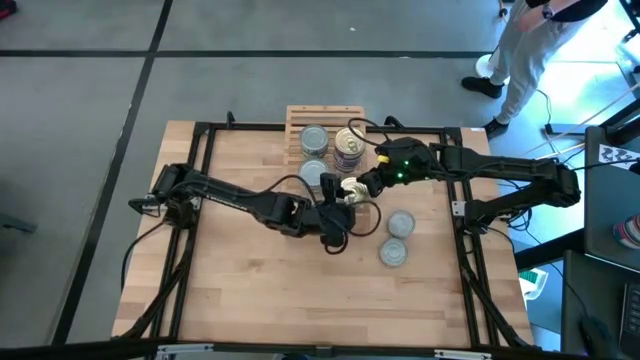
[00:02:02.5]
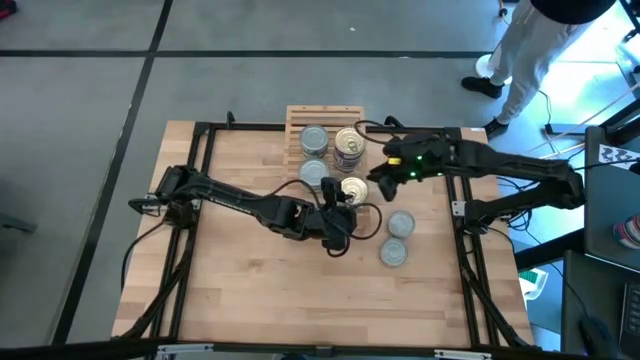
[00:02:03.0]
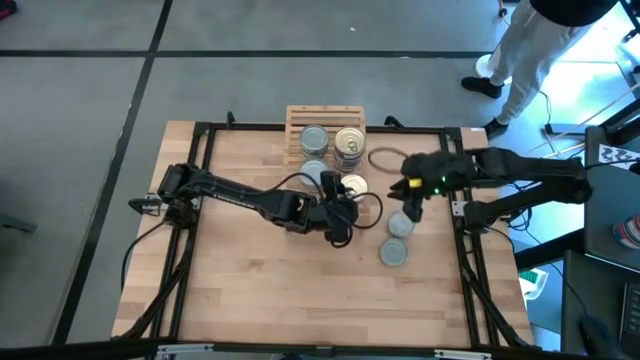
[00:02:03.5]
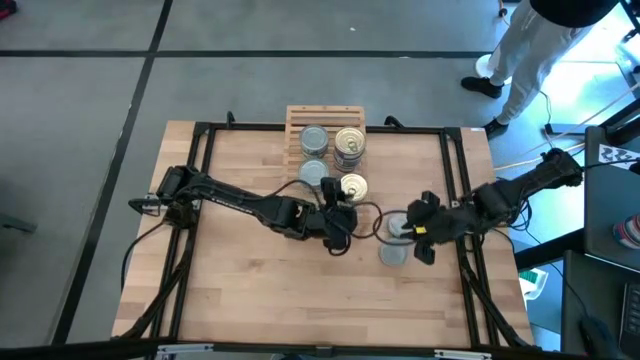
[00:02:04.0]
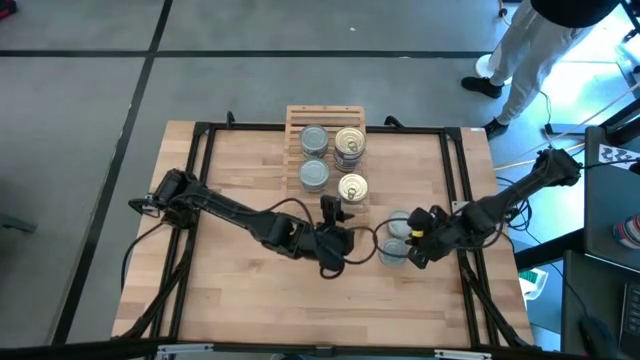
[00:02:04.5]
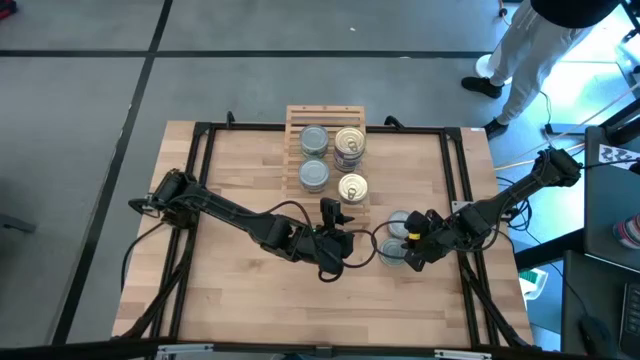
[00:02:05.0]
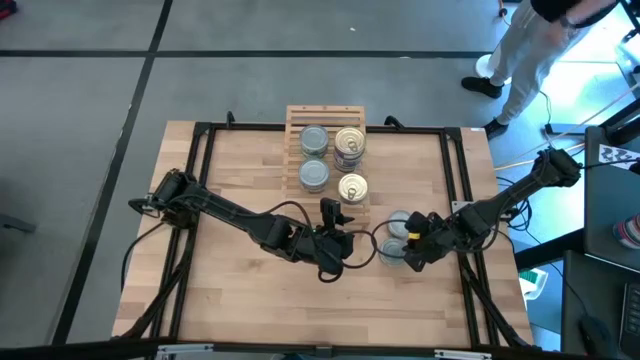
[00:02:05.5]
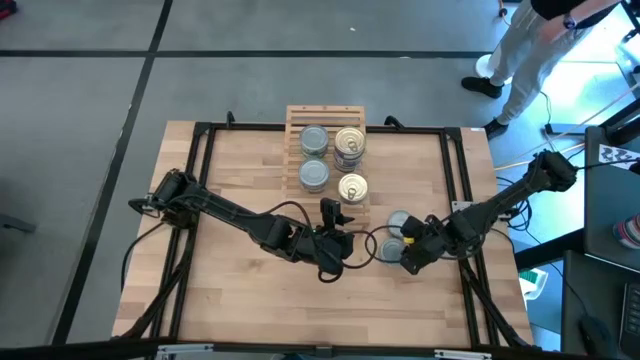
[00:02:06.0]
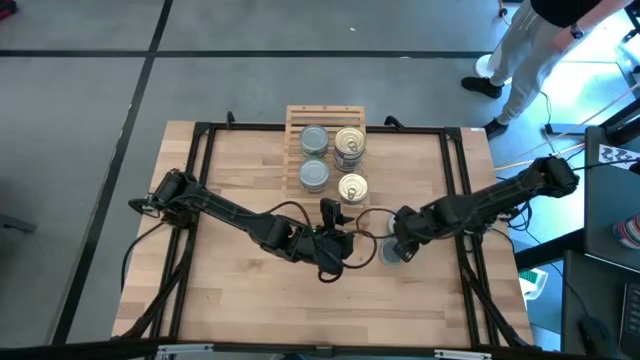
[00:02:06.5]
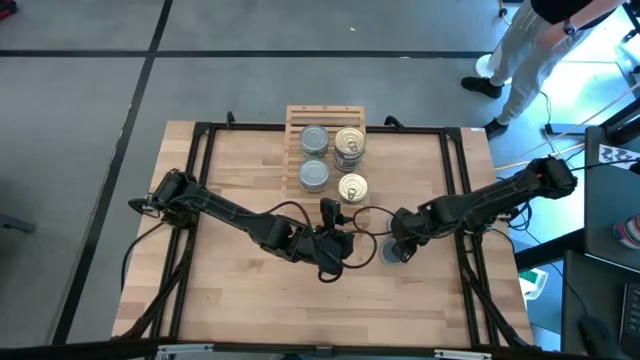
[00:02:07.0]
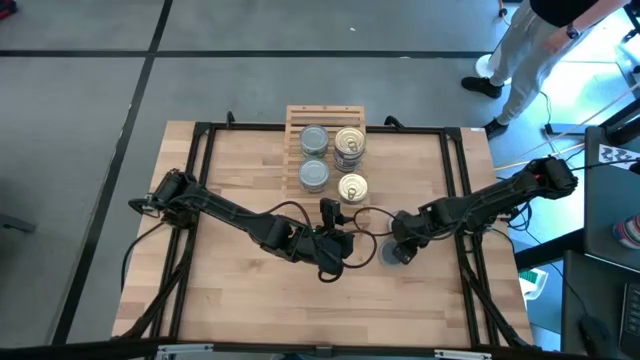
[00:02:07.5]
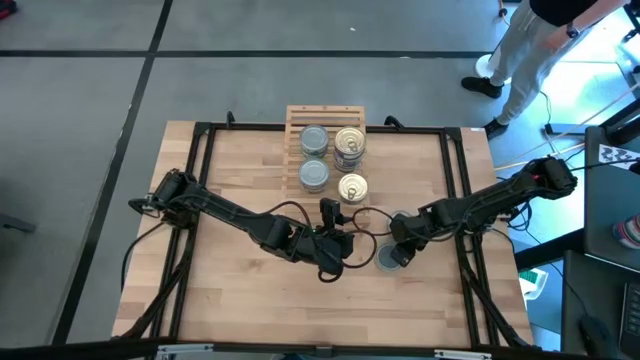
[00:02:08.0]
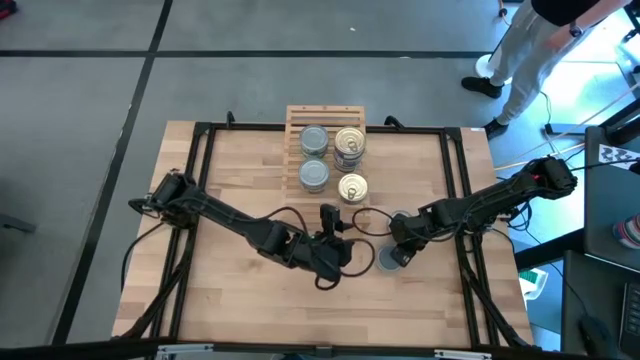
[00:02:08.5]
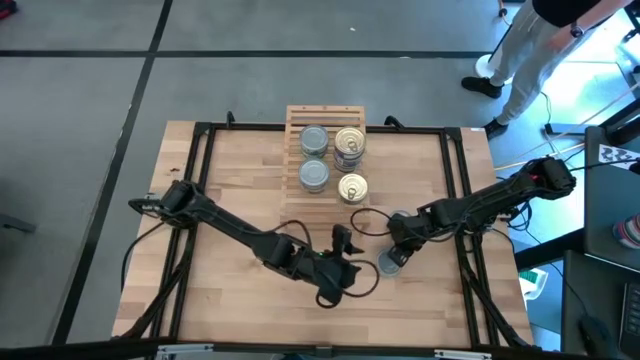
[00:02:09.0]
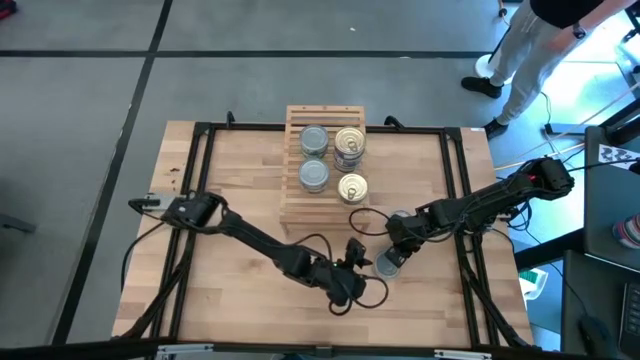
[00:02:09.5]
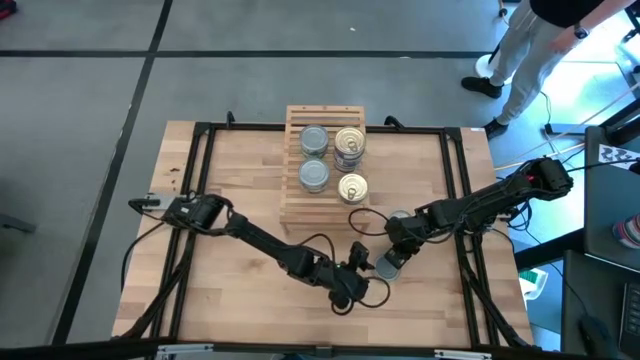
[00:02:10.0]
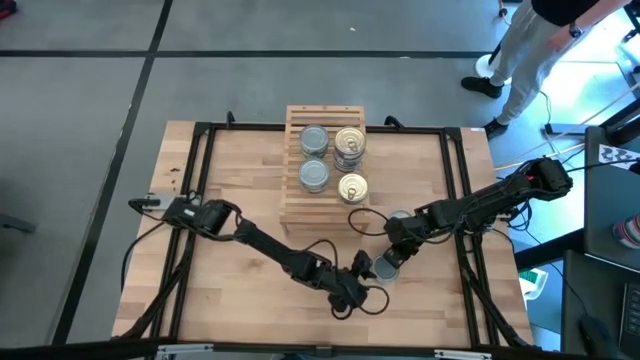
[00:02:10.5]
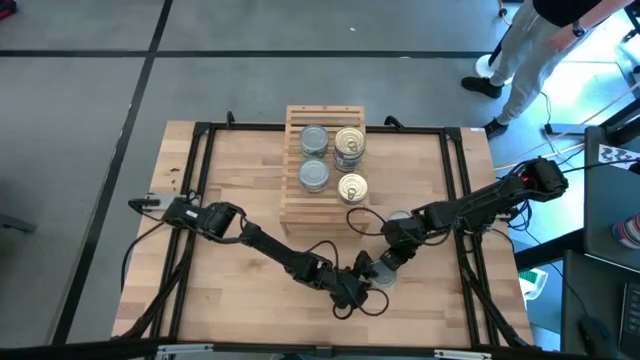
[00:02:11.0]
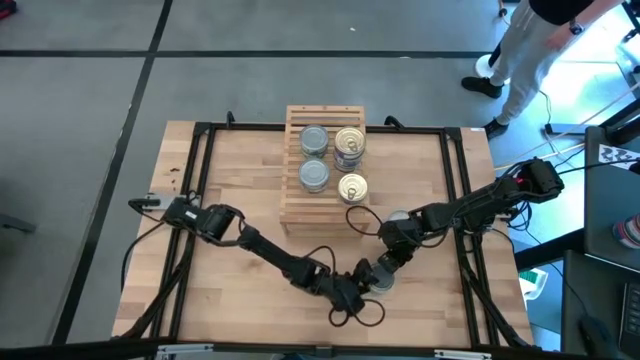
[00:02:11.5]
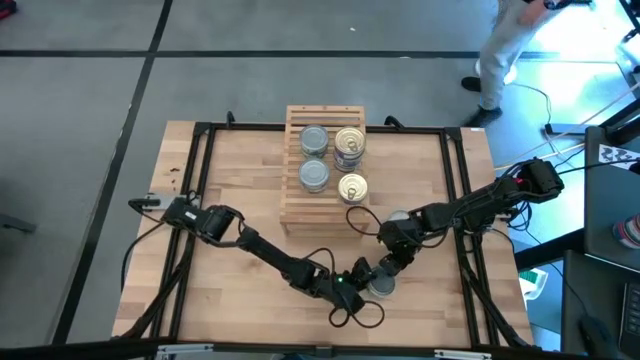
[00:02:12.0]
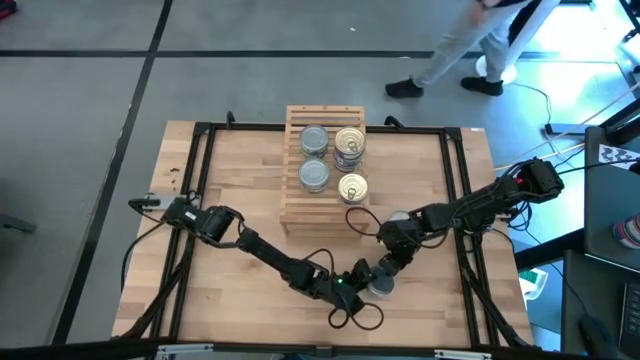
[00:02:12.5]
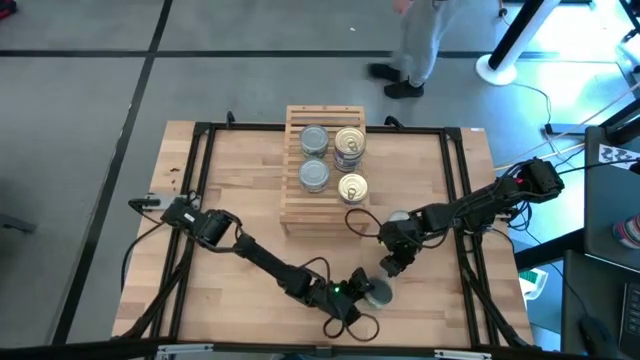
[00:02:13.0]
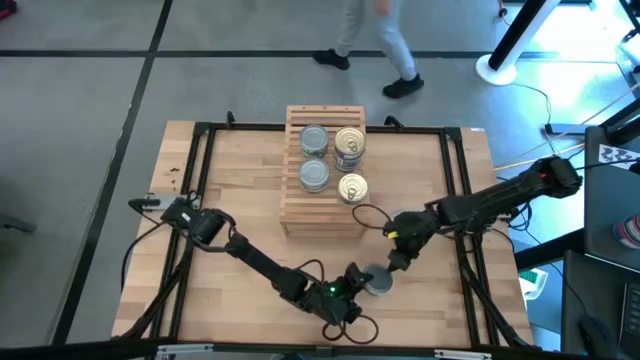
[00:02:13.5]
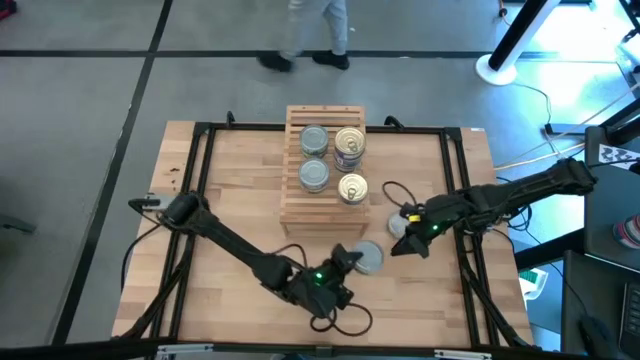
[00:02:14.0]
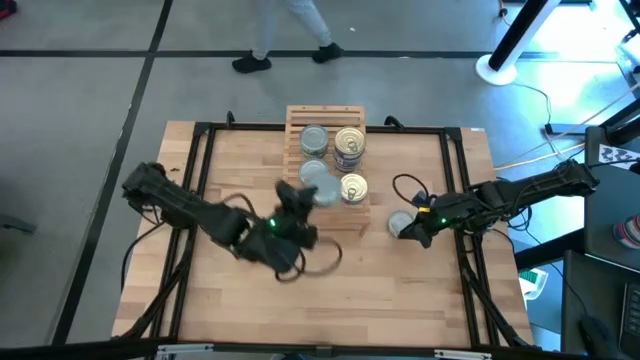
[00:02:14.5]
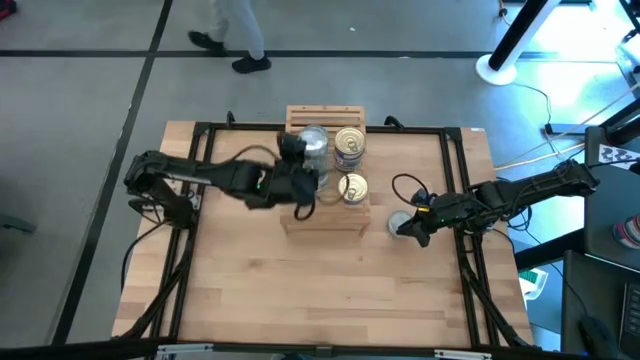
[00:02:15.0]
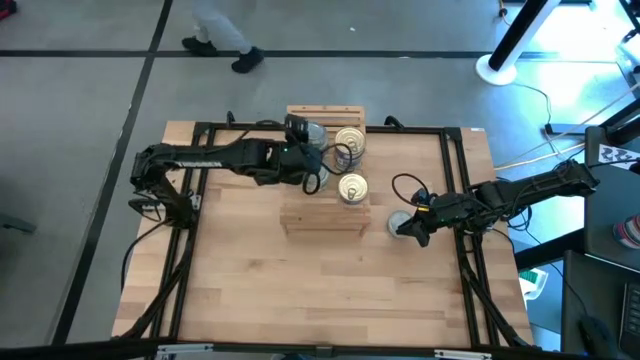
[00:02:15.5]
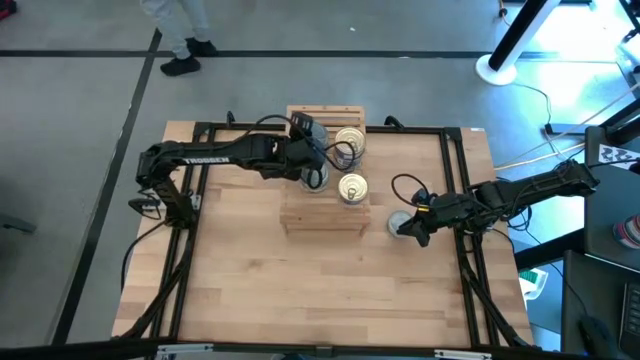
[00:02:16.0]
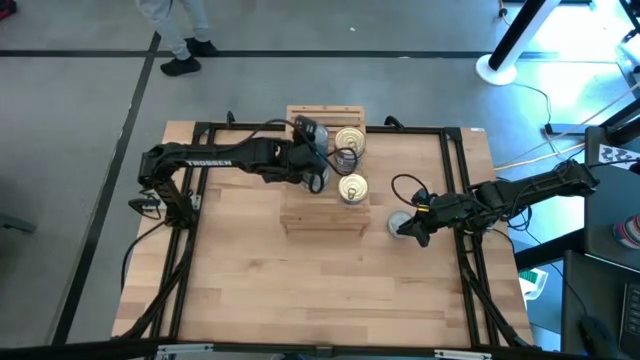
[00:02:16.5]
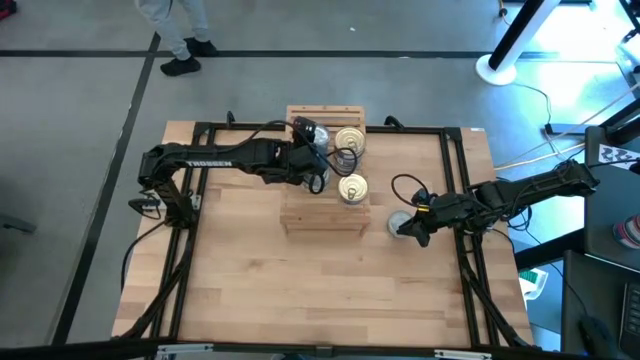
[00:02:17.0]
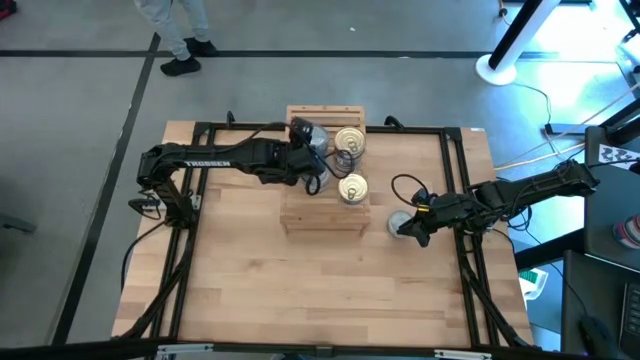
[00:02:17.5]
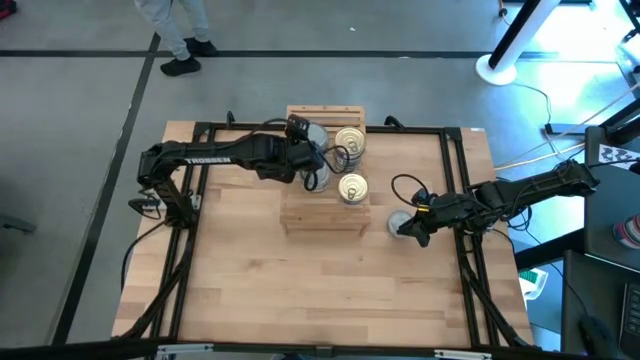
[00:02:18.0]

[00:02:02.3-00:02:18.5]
Task: Stack canned seafood by type on shelf
Stack the green tuna can on top of the green tuna can on the shelf

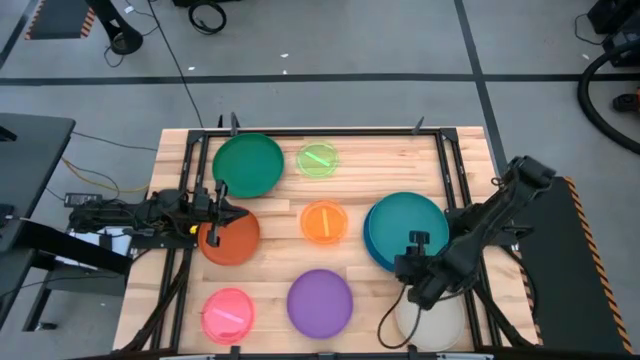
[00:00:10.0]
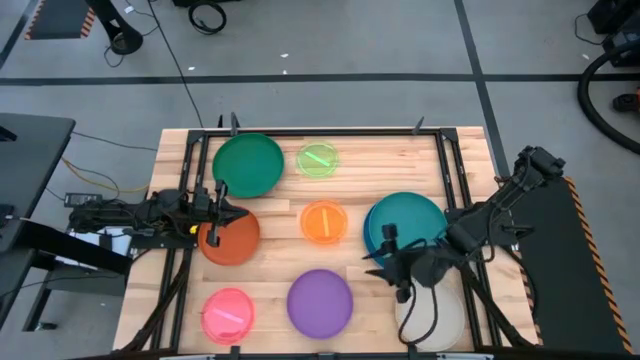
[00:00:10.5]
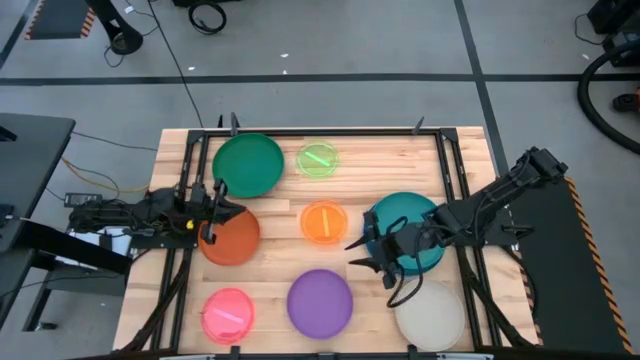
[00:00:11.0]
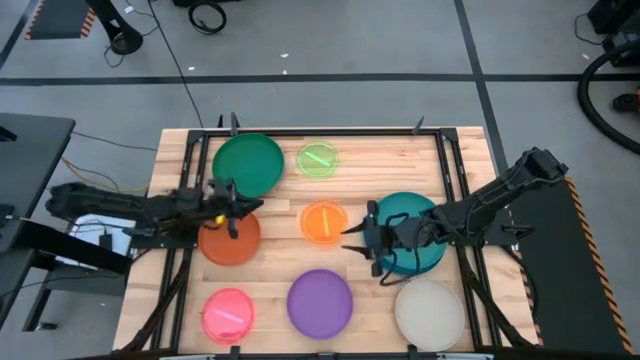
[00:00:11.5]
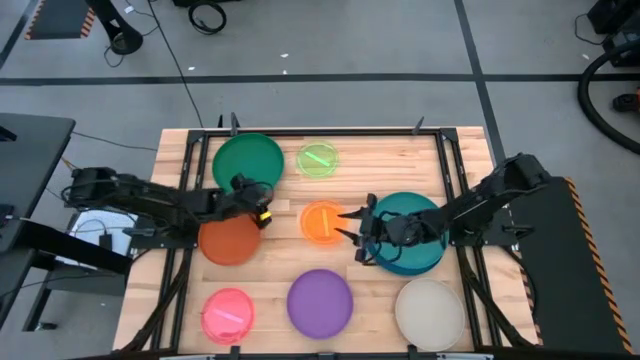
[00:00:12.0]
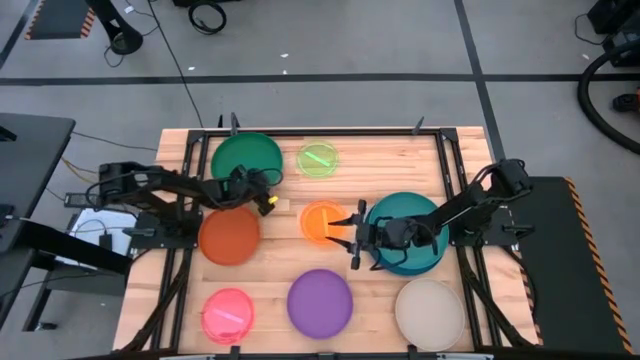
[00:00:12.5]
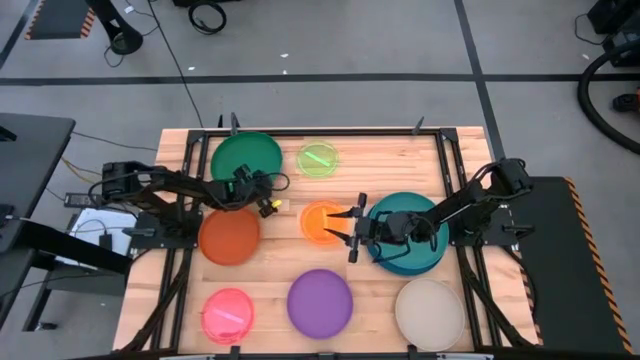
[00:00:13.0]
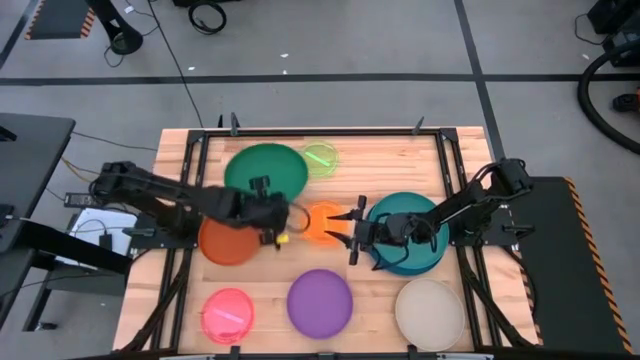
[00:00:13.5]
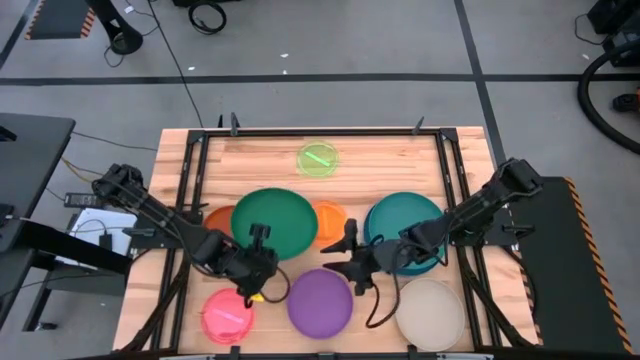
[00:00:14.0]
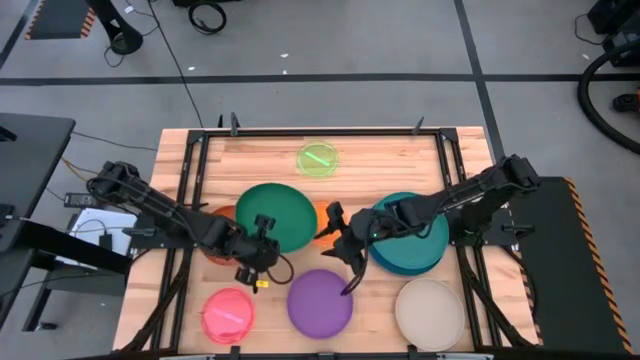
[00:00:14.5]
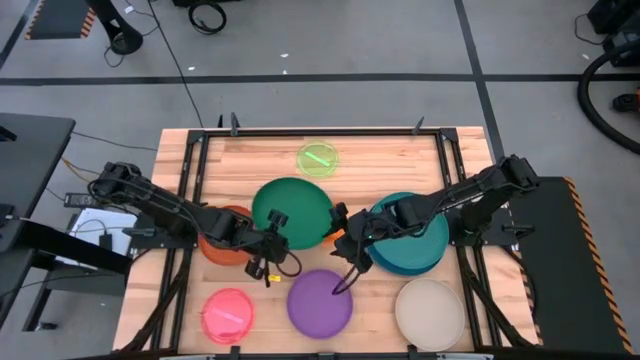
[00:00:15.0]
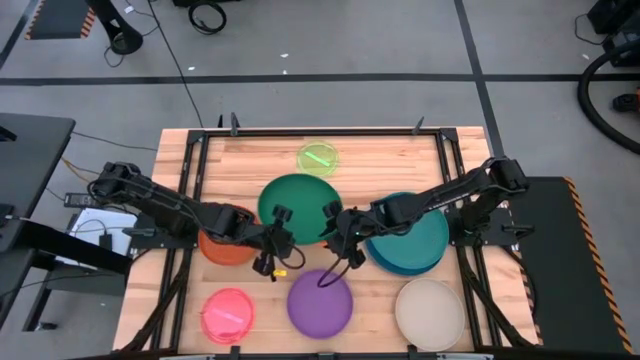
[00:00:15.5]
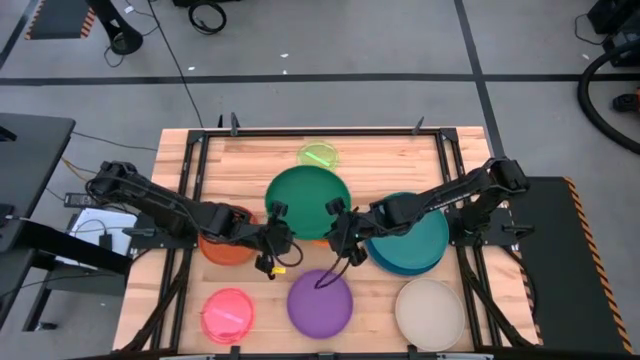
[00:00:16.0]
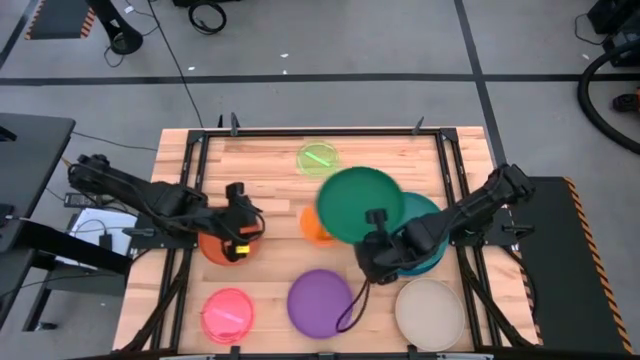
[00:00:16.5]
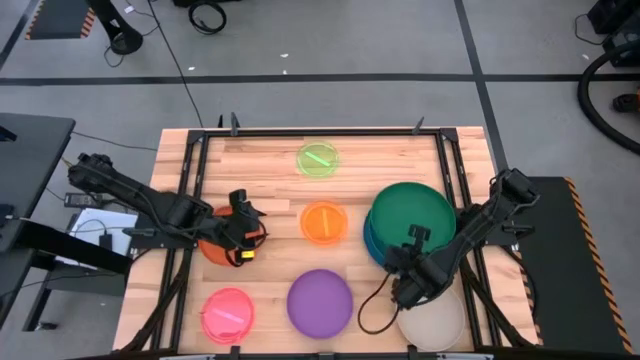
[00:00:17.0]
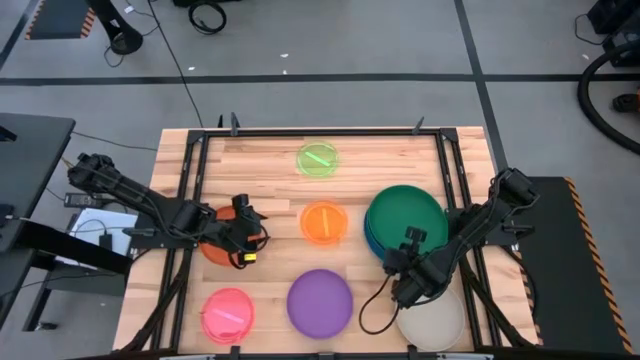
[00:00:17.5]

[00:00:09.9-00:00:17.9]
Task: Stack plastic plates
Stack the dark green plate on top of the light green plate
